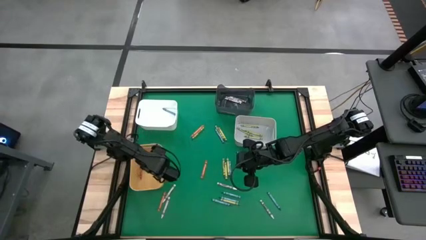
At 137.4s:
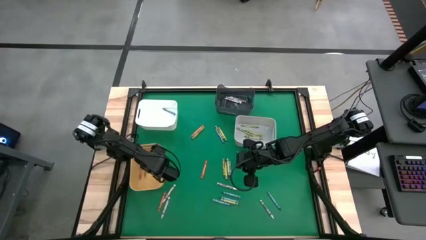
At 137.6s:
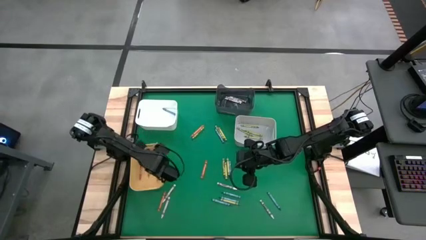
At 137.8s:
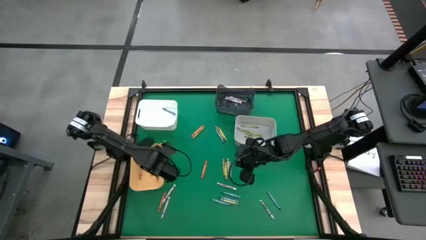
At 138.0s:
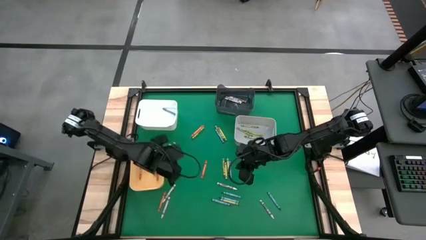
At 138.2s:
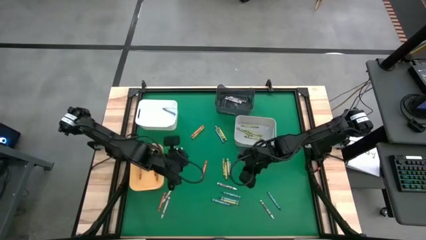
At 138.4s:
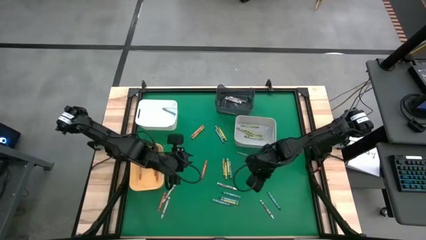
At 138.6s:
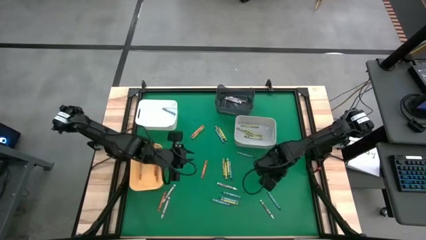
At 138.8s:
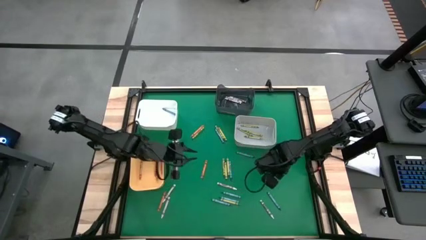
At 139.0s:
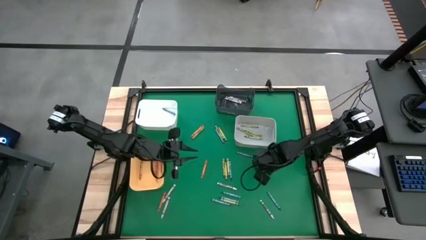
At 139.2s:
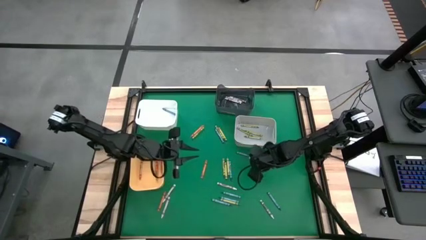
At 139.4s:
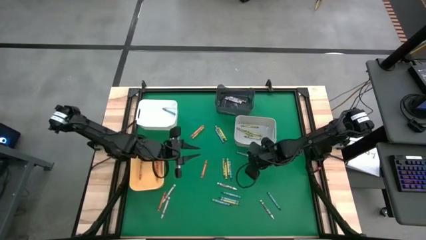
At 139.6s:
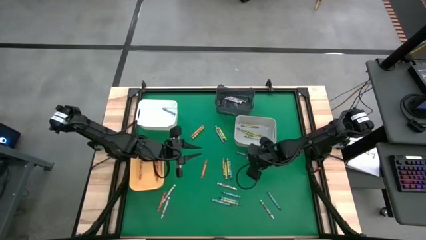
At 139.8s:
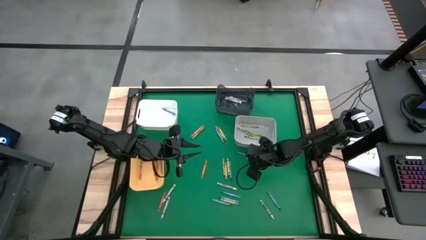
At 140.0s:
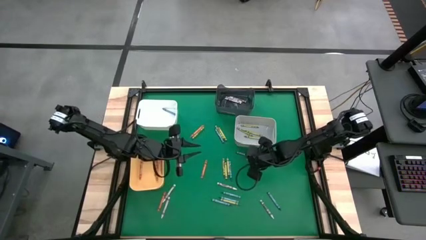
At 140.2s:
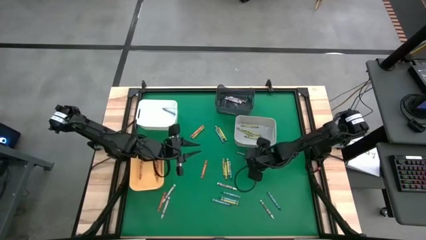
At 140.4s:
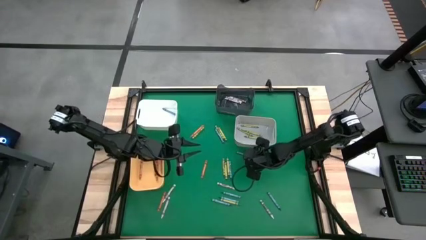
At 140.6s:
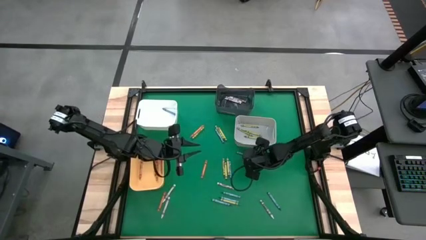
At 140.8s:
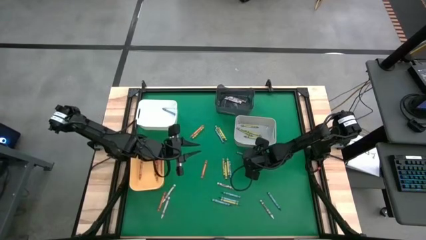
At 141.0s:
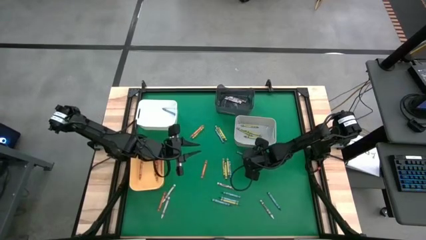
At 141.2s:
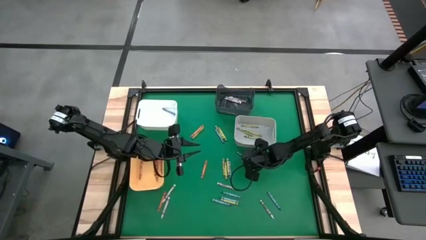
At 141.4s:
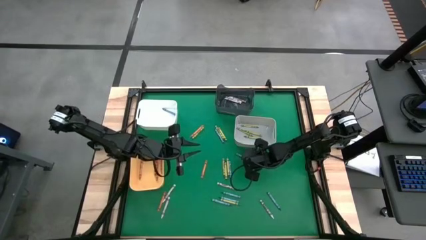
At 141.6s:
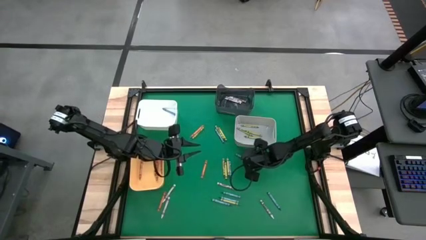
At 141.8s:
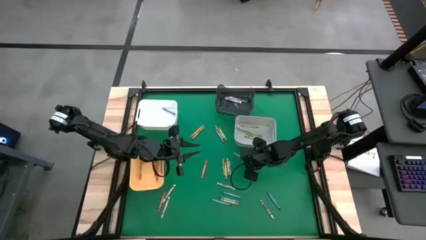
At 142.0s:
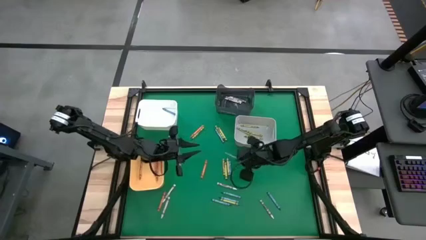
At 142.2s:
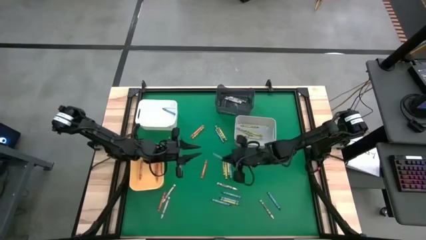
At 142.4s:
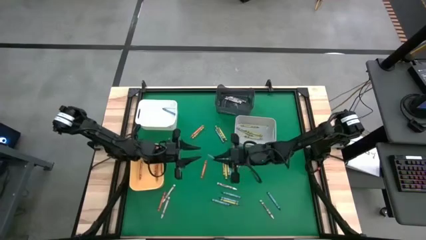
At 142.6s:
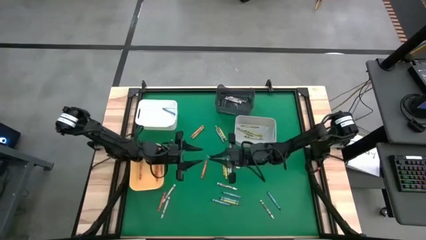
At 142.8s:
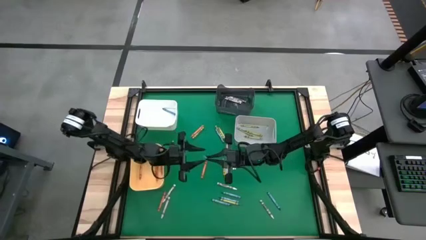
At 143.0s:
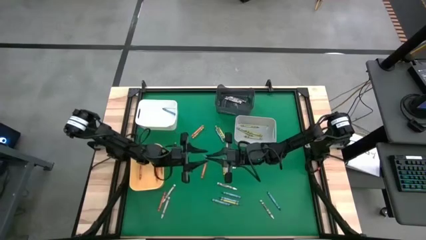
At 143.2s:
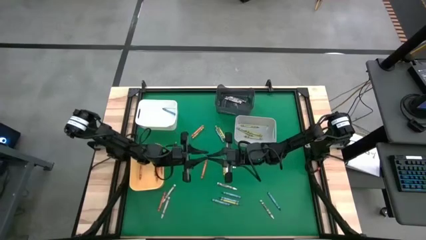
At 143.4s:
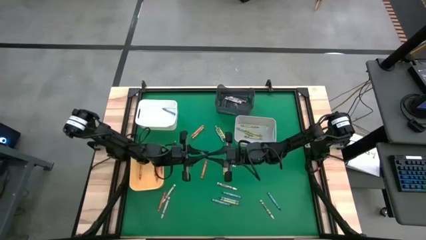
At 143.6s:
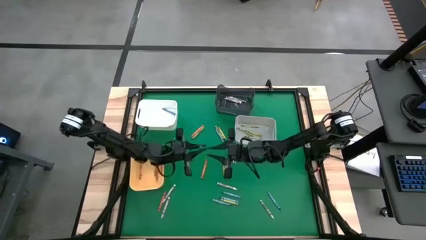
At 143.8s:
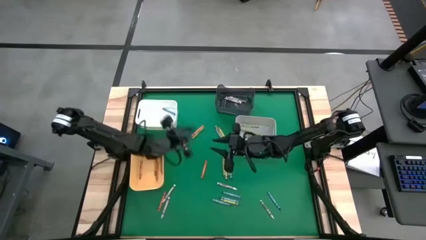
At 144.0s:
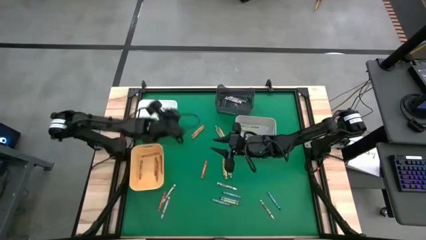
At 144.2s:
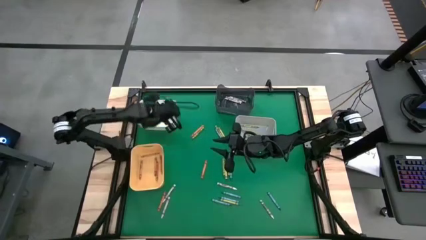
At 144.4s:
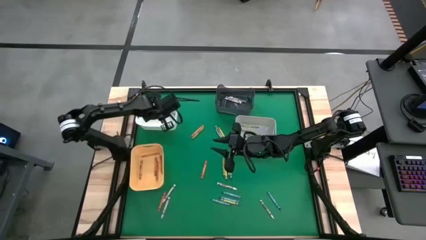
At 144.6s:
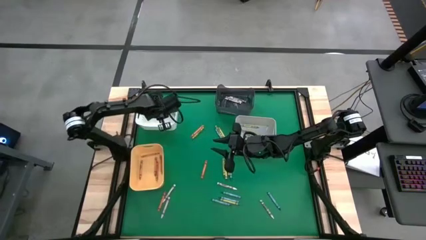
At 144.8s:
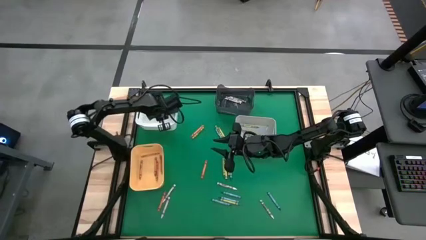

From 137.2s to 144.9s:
Task: Sort crayons
Put the blue crayon into the white bin

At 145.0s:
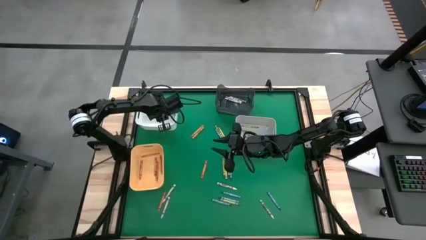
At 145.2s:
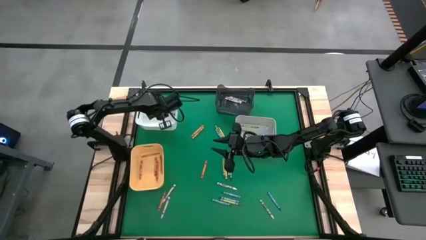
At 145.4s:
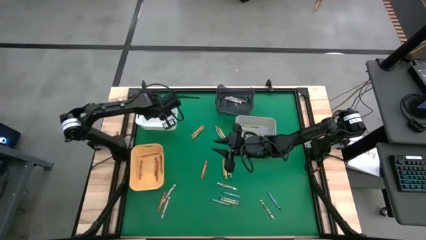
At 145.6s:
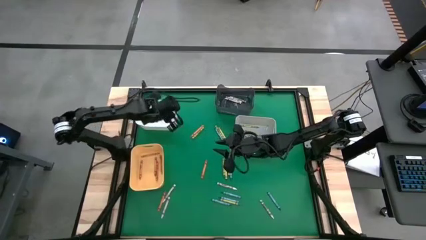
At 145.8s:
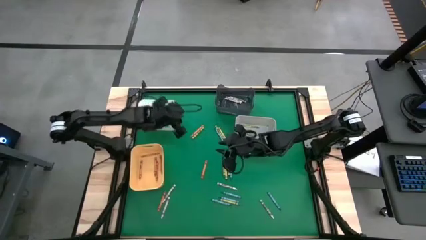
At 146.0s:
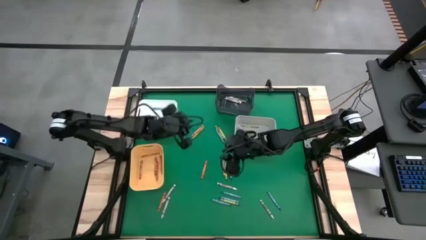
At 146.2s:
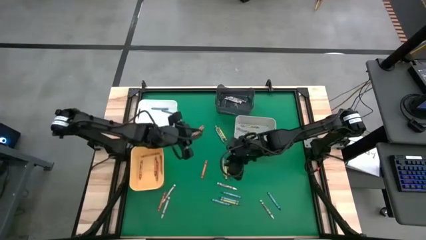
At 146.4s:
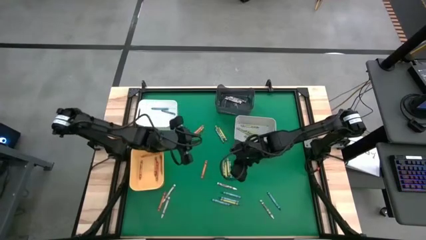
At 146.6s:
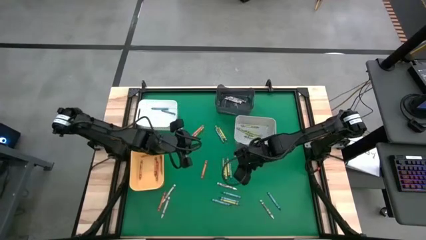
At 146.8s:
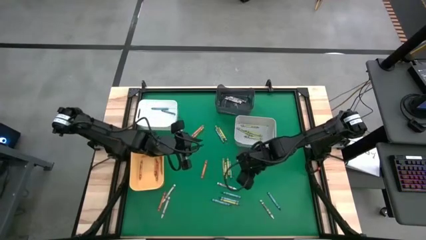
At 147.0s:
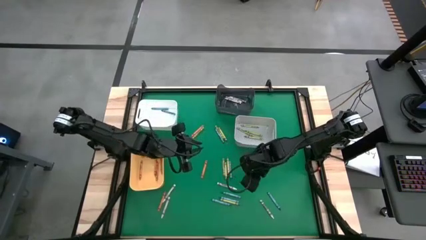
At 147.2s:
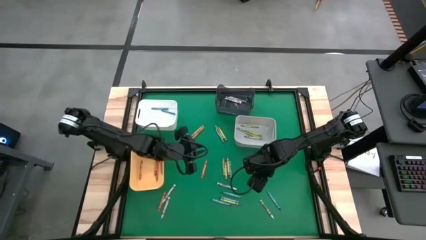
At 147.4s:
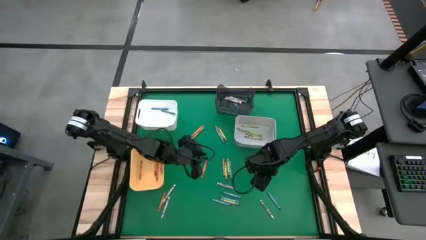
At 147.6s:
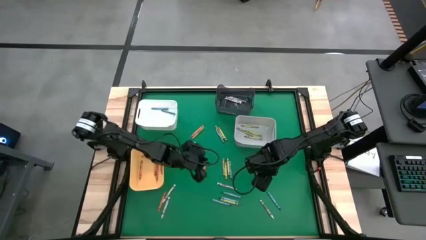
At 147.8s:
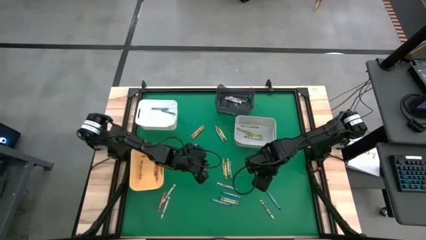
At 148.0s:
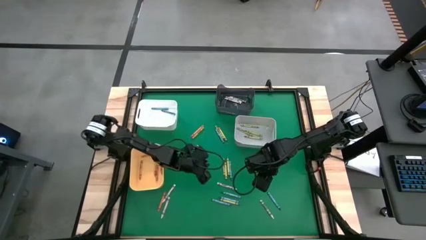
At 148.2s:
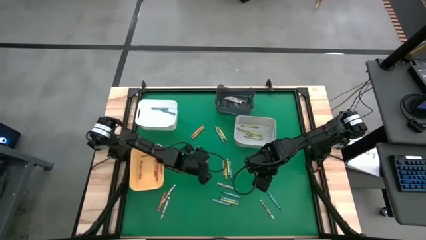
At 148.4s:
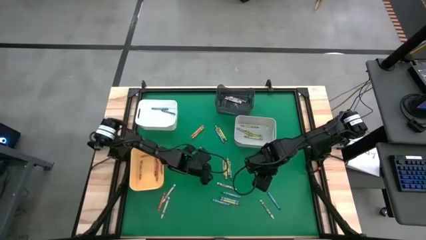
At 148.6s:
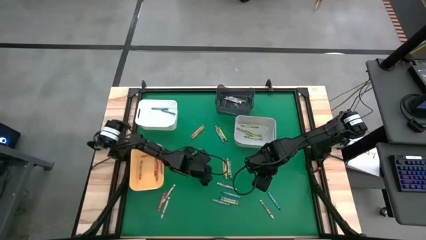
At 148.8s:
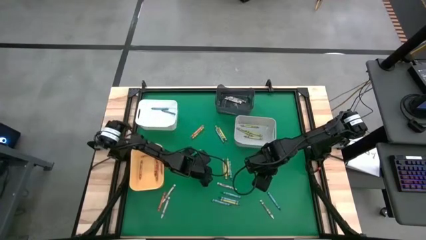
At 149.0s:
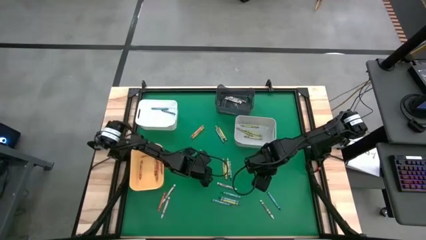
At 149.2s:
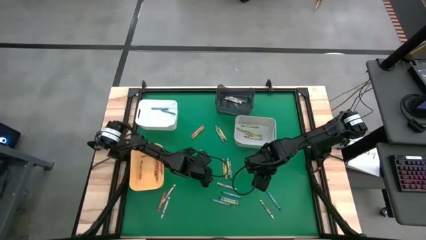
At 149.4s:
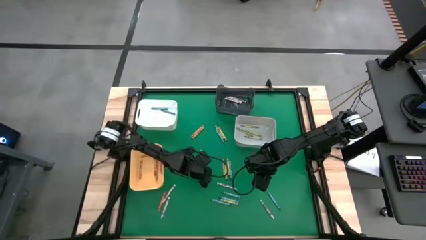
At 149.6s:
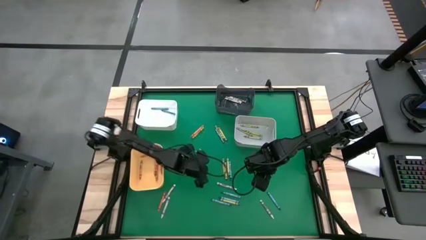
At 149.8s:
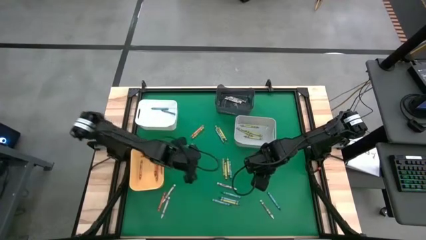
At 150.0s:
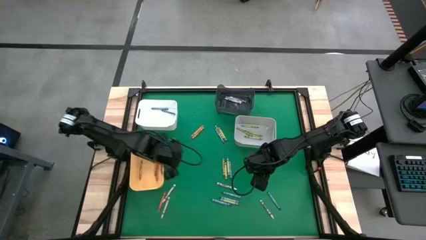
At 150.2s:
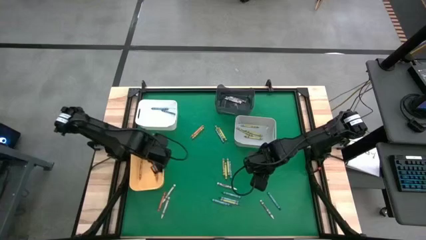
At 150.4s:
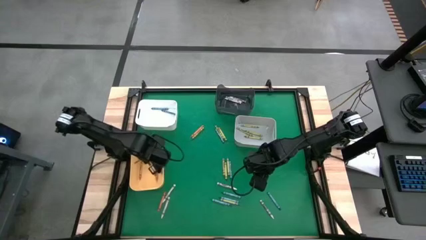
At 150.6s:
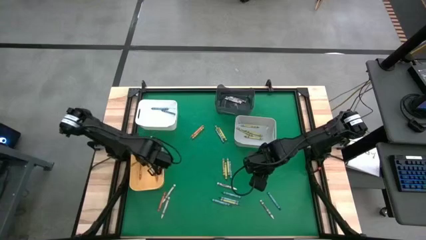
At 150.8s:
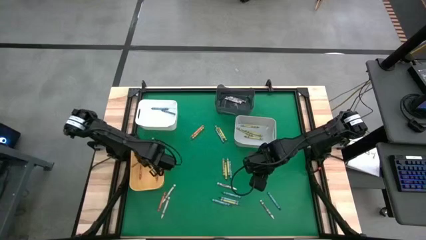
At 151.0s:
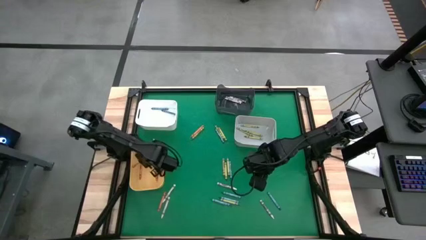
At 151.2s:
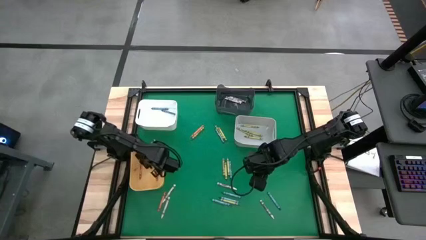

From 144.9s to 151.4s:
Put the orange crayon into the orange bin
